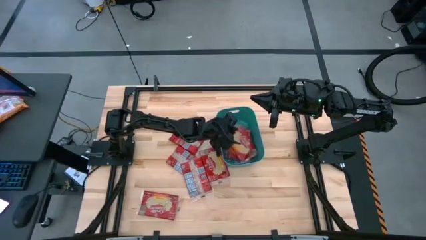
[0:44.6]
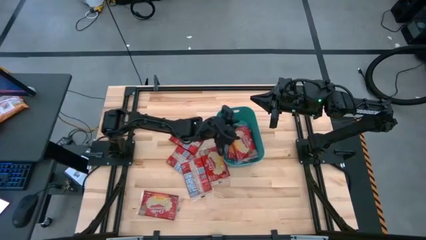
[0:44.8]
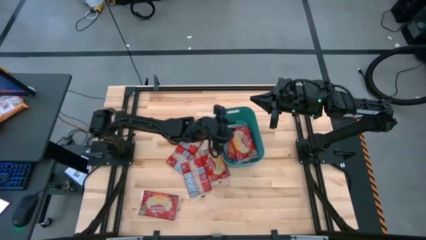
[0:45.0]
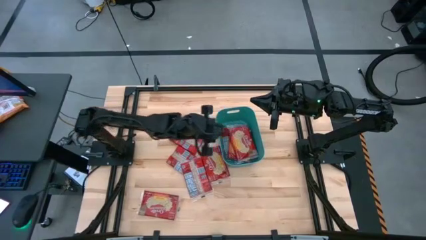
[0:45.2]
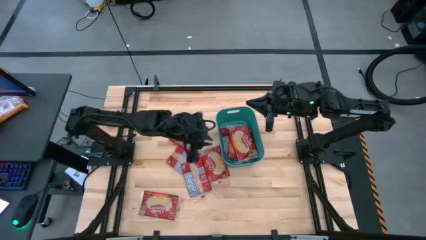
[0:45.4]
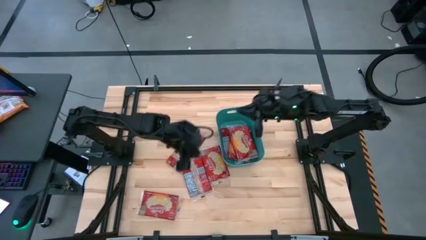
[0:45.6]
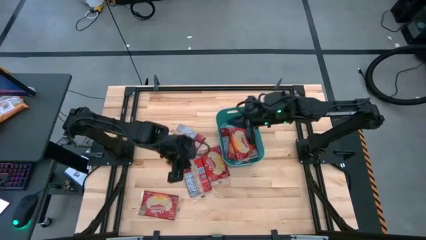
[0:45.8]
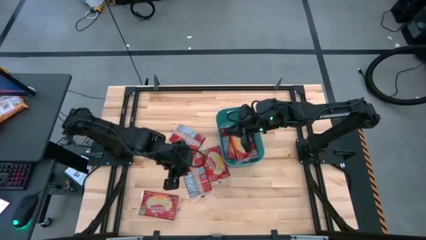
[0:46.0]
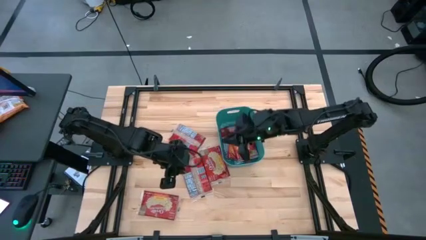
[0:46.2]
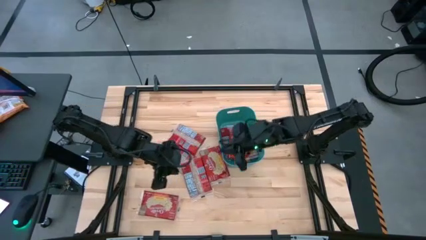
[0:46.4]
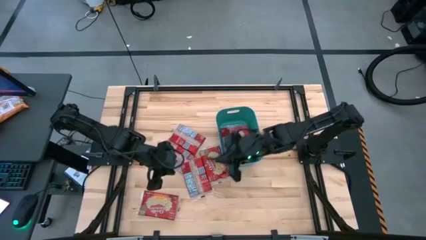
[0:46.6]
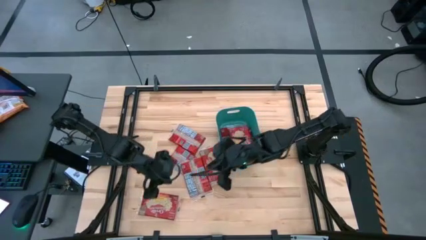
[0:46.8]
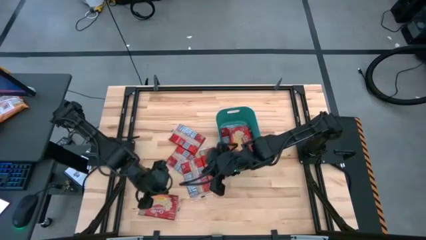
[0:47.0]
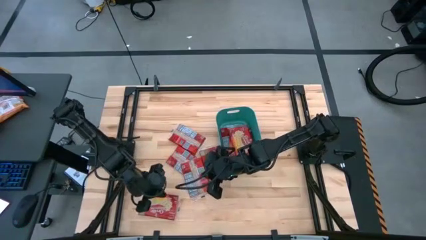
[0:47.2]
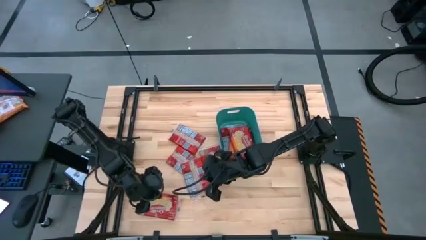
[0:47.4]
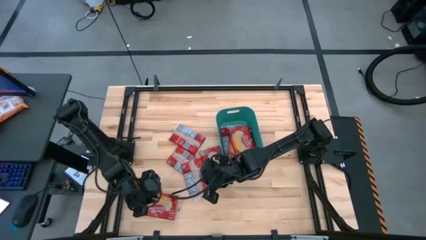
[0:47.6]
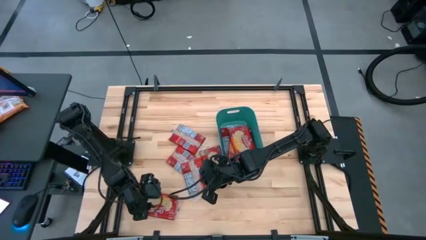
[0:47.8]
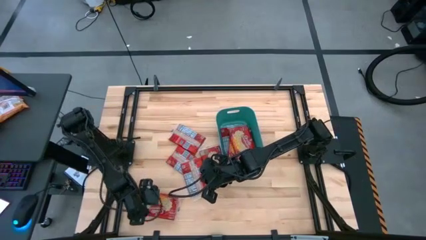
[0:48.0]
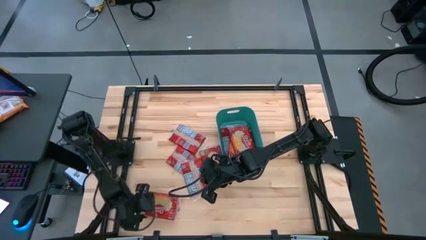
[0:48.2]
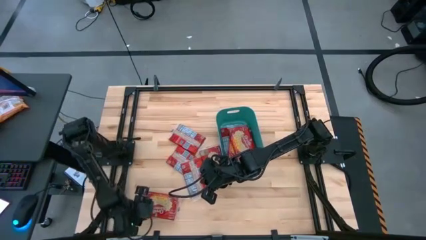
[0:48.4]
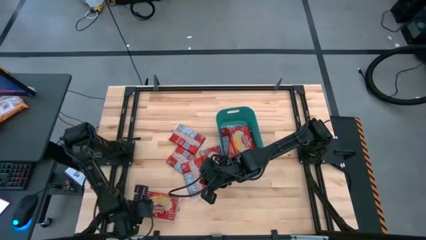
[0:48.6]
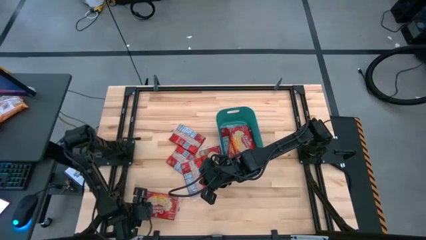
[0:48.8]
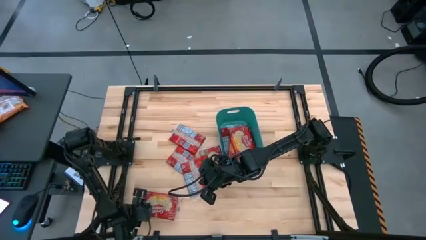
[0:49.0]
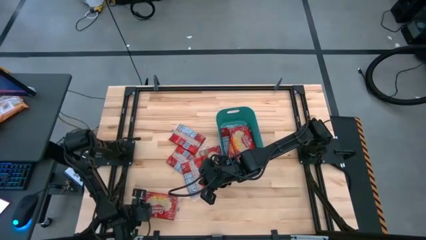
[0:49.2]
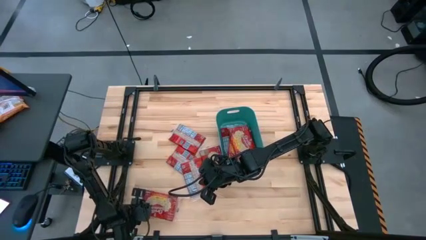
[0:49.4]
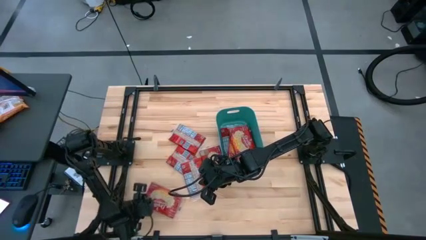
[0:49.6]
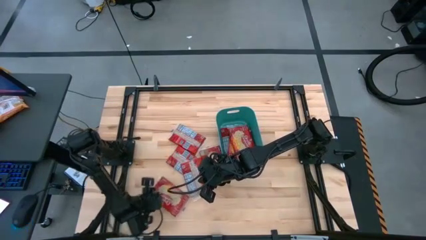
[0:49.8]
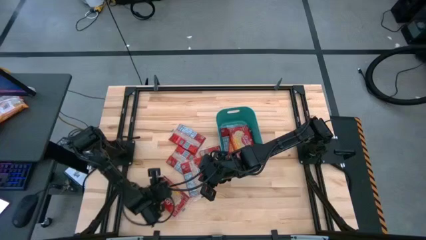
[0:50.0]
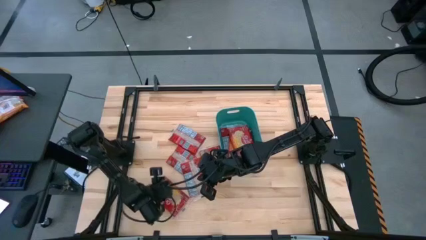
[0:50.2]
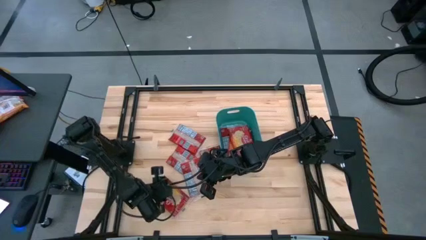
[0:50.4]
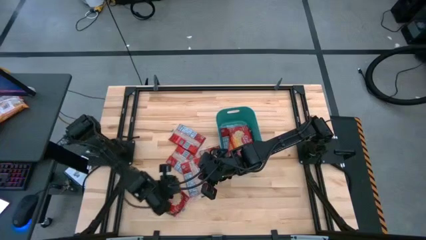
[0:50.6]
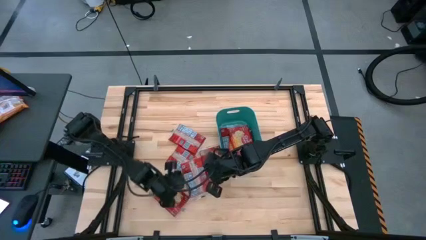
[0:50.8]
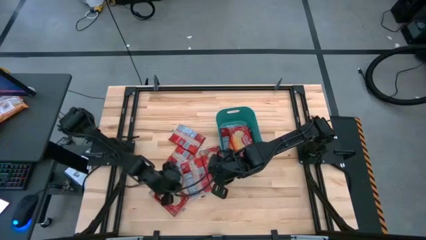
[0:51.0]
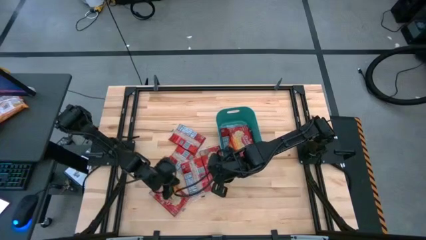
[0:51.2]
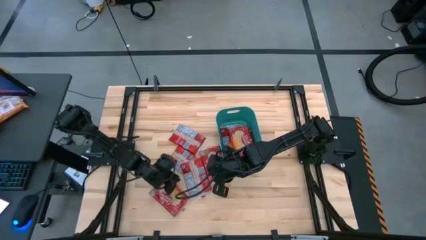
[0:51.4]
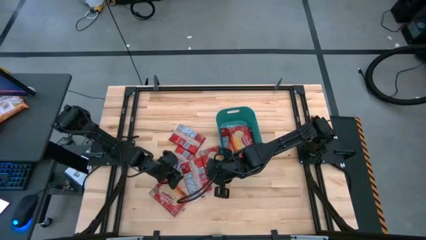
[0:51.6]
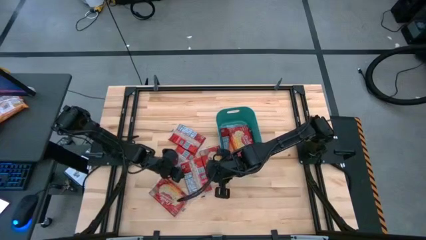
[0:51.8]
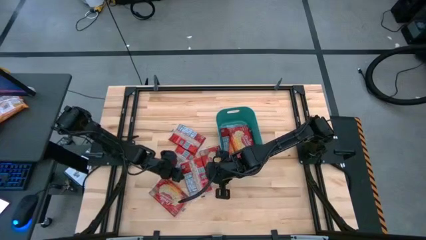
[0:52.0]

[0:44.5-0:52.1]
Task: Sort popcorn bags into baskets
Put the red popcorn pack into the green bin

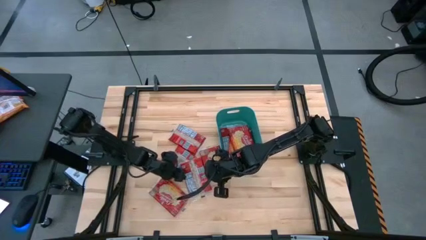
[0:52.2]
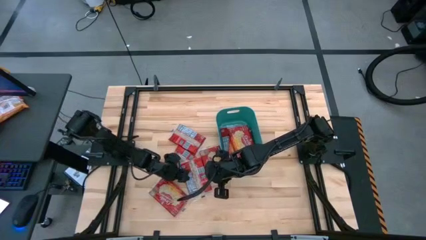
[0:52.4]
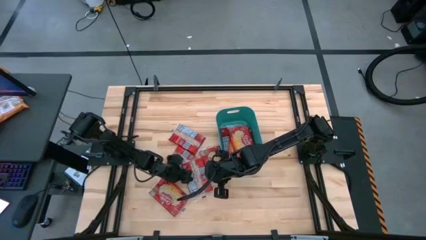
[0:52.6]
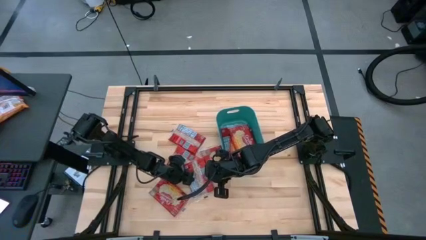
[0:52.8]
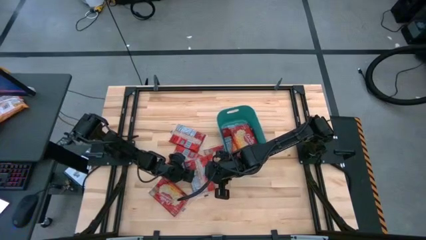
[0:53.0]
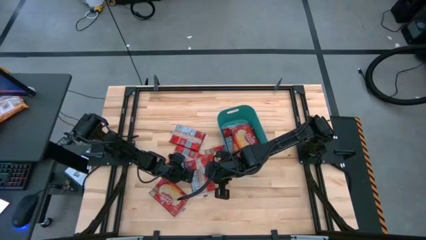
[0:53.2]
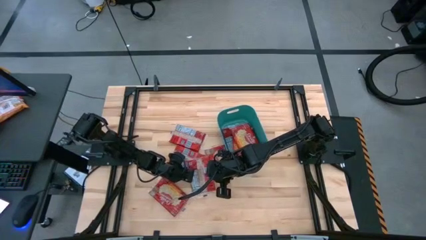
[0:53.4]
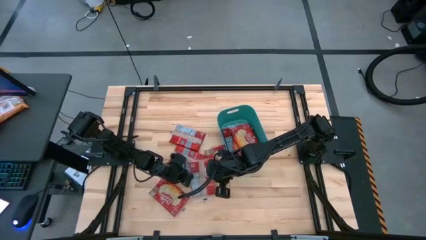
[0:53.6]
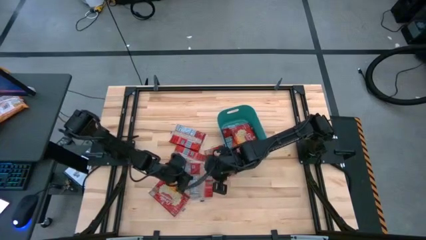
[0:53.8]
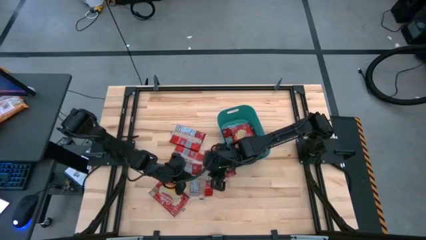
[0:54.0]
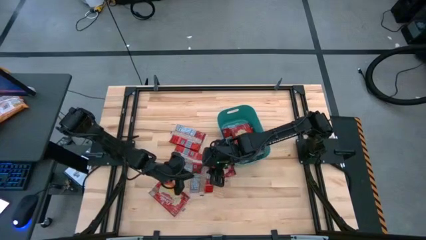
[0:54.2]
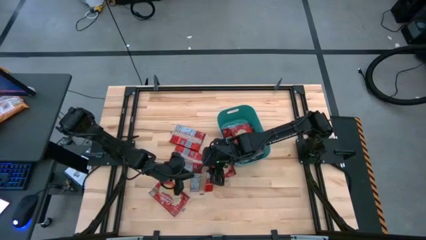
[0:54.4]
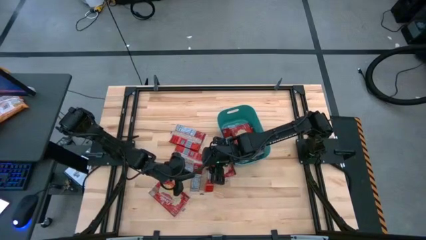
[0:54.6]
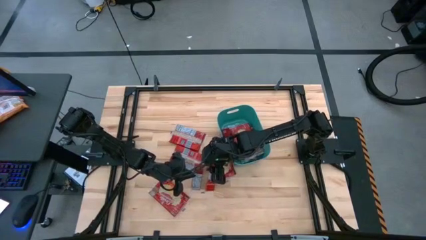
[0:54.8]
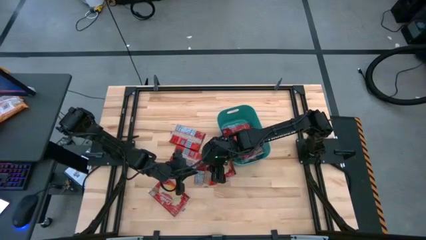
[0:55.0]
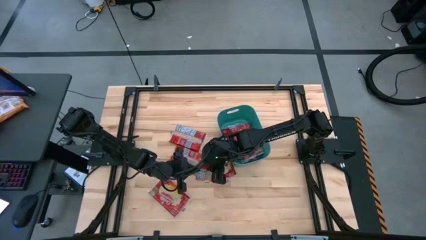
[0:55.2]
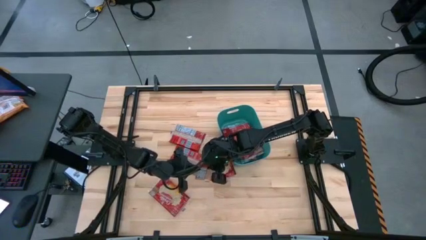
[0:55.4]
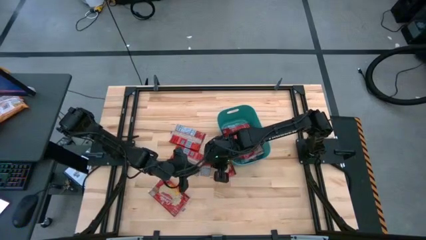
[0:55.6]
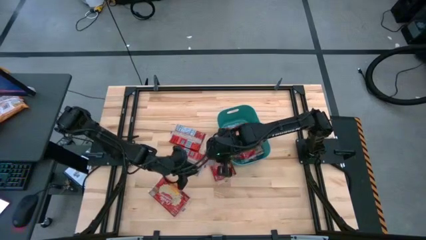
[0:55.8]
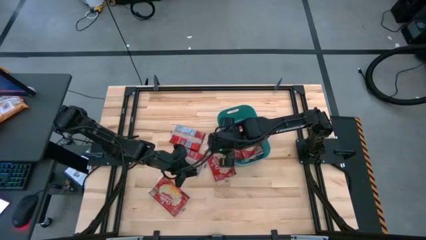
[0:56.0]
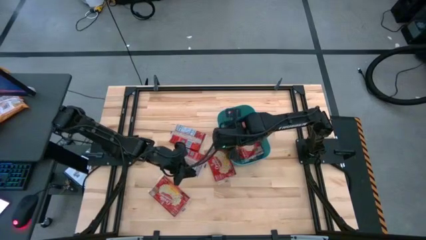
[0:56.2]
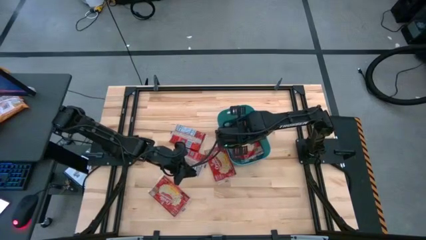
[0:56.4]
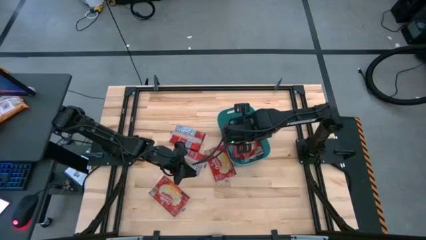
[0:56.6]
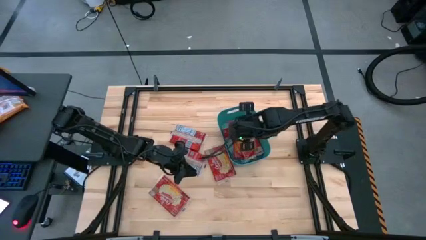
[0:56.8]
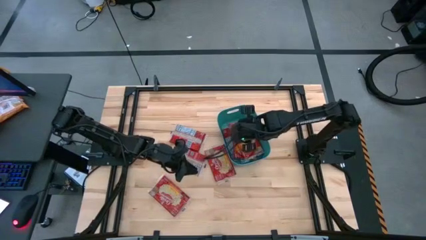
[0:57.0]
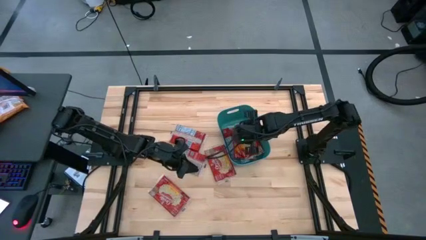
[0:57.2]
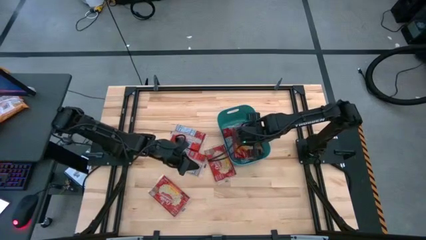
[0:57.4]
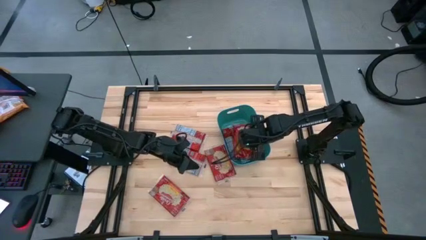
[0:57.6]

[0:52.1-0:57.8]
Put the red popcorn pack into the green bin

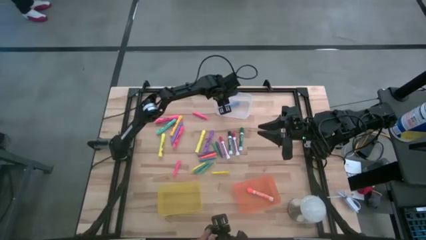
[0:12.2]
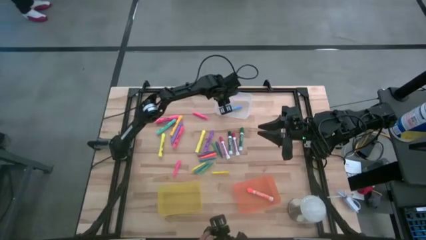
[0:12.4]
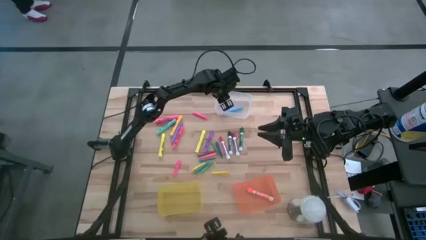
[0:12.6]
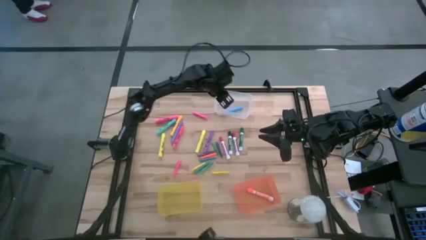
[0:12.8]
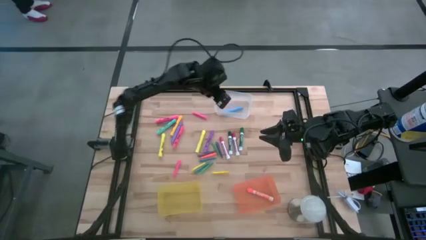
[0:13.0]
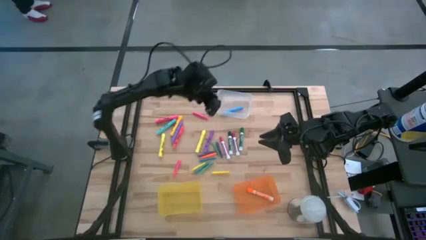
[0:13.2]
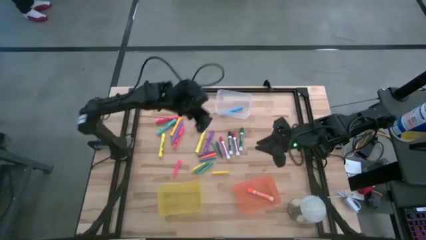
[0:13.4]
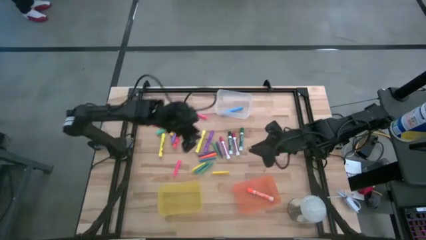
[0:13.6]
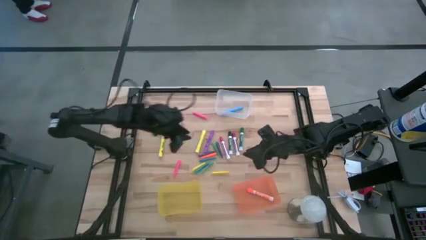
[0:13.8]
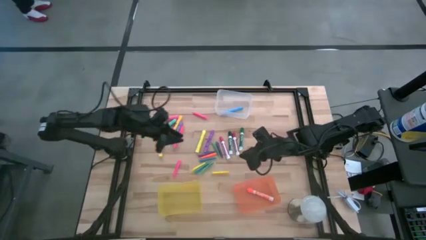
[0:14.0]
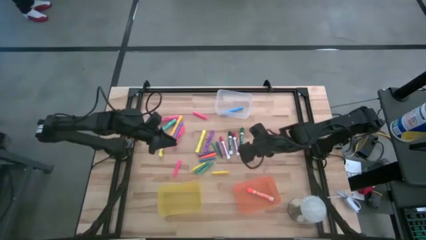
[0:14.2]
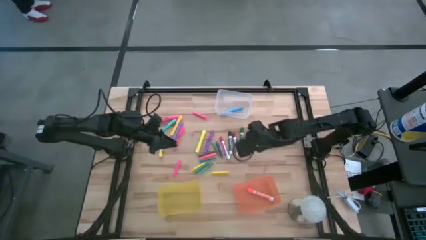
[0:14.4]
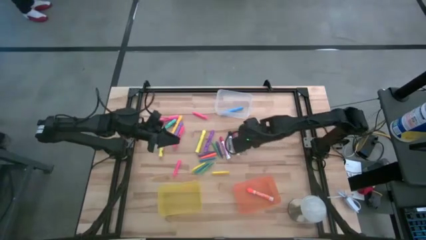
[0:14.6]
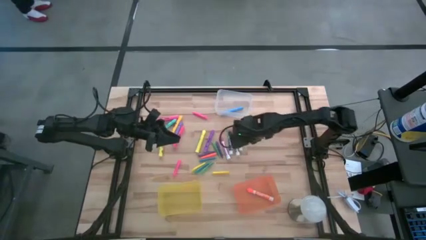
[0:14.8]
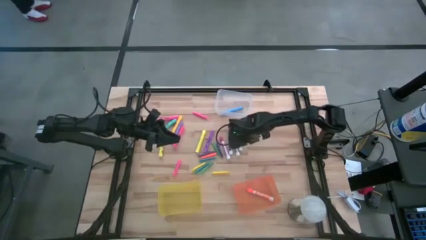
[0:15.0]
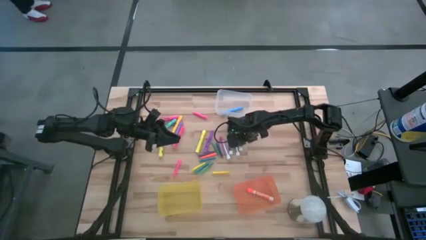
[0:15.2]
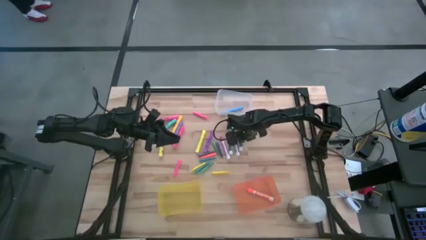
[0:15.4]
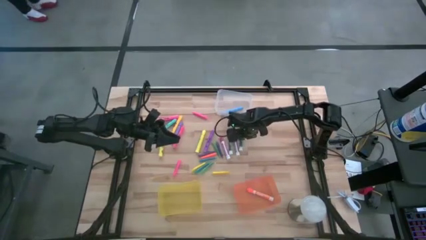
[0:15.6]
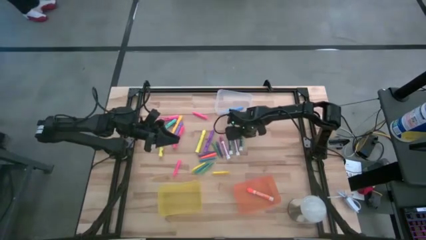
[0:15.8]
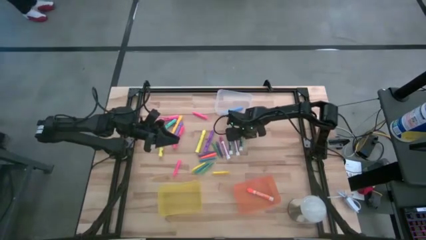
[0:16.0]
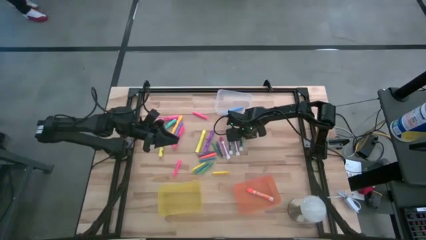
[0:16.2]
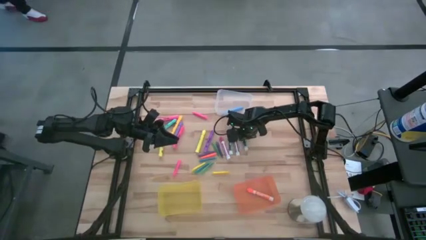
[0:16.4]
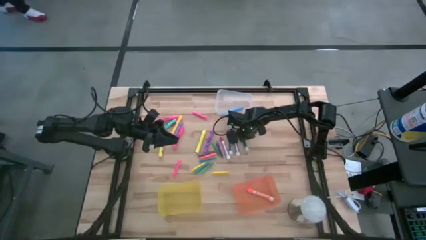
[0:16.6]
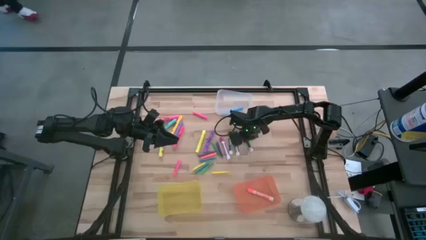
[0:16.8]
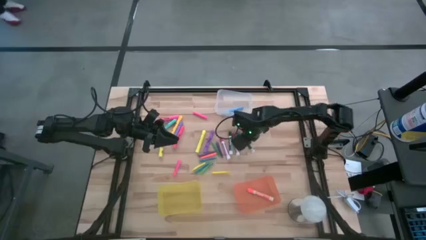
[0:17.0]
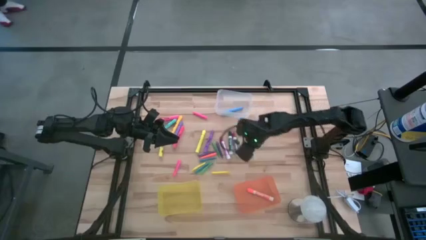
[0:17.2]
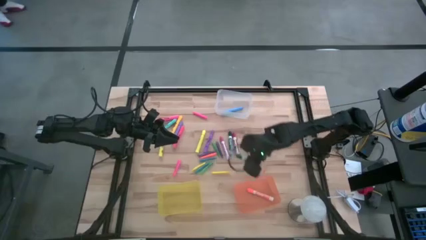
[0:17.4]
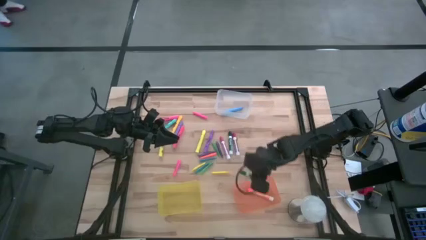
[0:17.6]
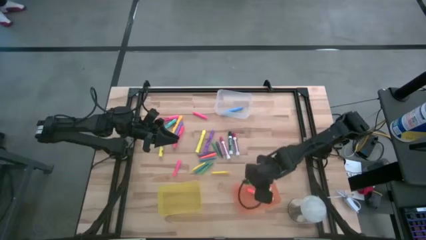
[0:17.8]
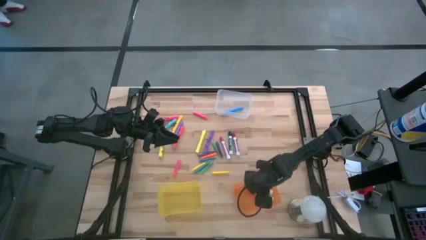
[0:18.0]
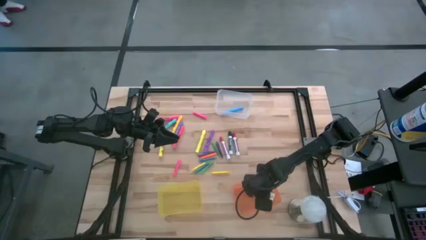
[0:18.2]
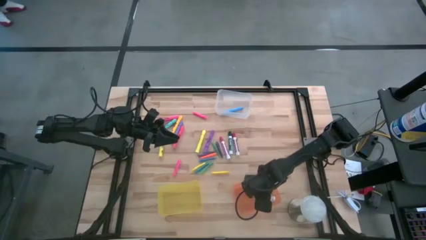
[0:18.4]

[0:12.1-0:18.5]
Task: Pick & Place Markers
Put the right green marker pen into the orange bin
